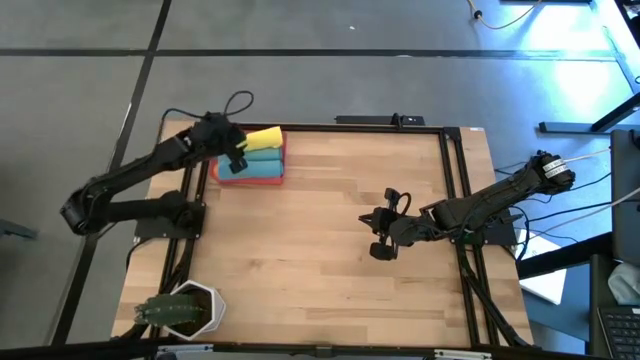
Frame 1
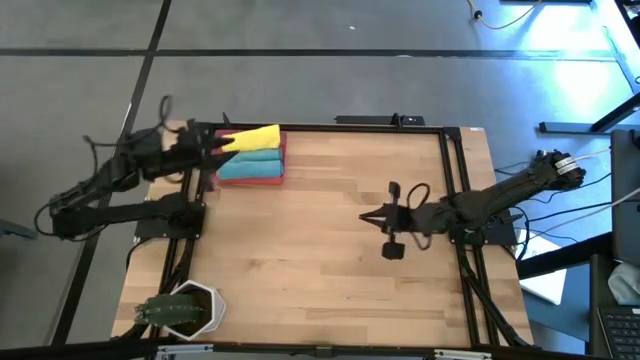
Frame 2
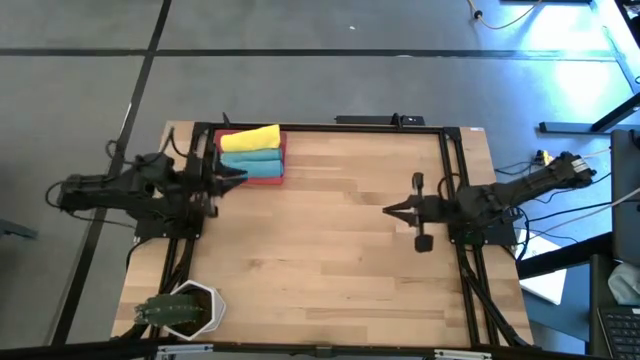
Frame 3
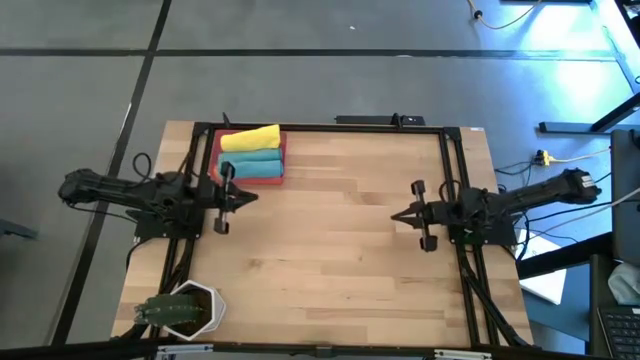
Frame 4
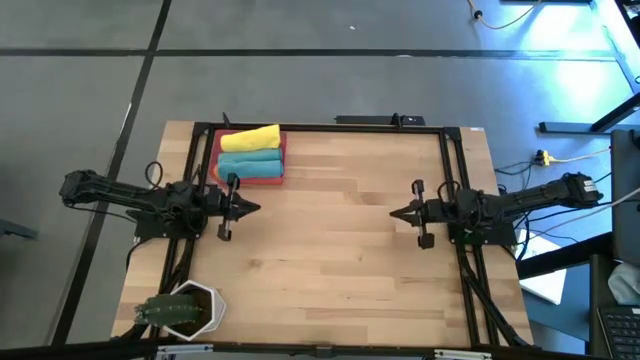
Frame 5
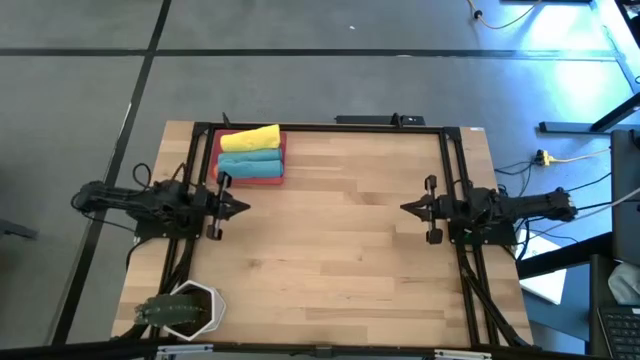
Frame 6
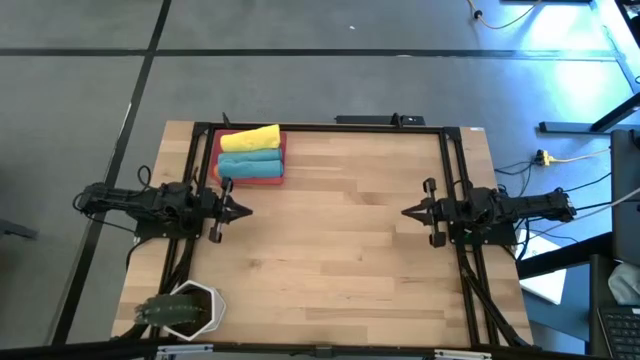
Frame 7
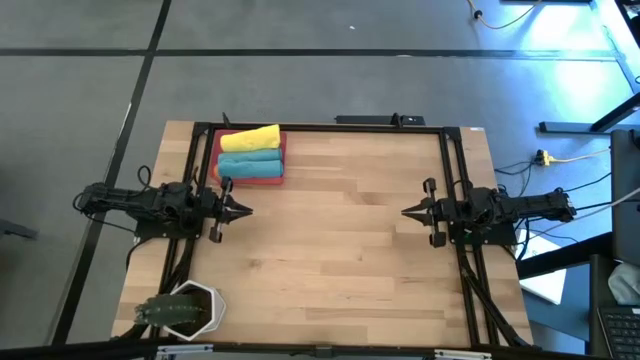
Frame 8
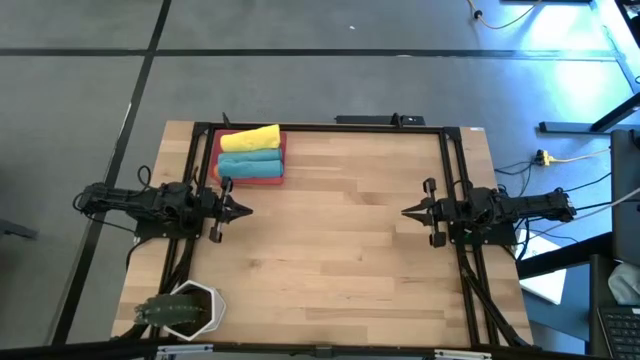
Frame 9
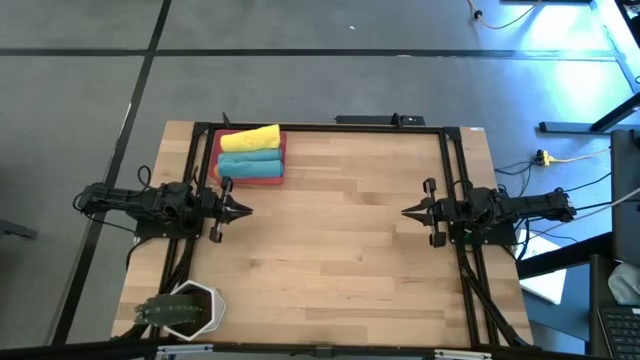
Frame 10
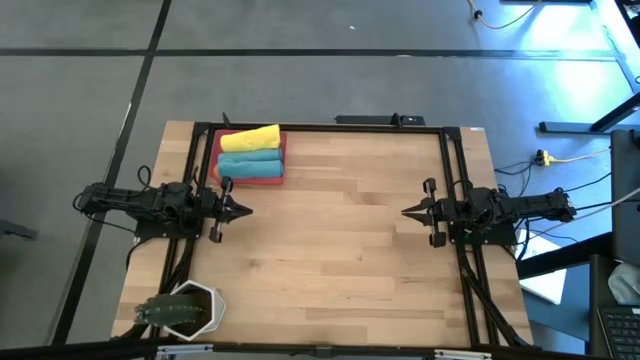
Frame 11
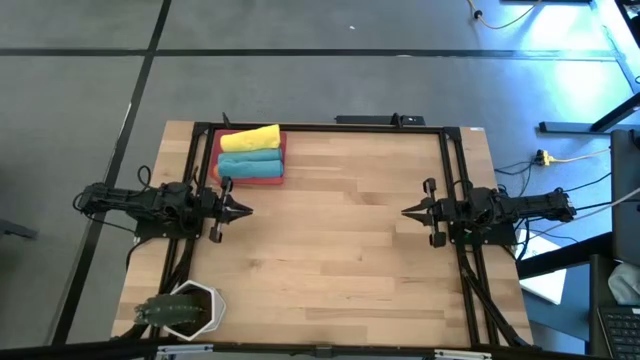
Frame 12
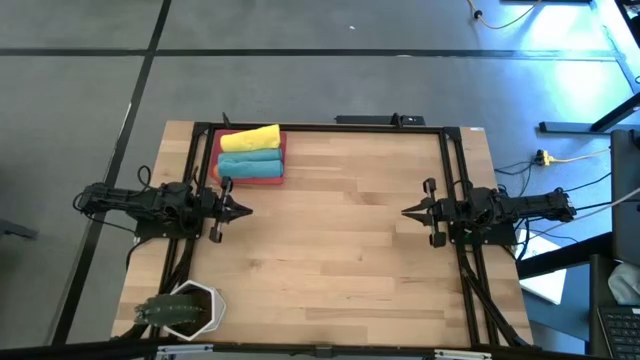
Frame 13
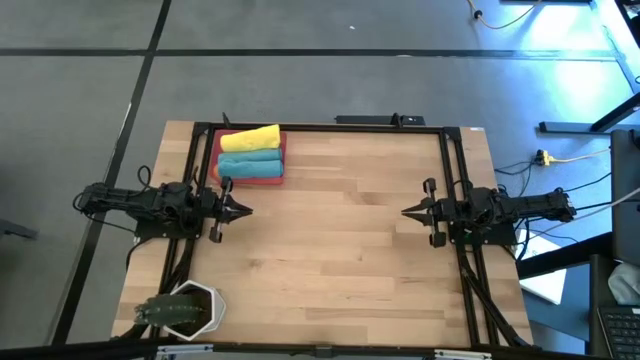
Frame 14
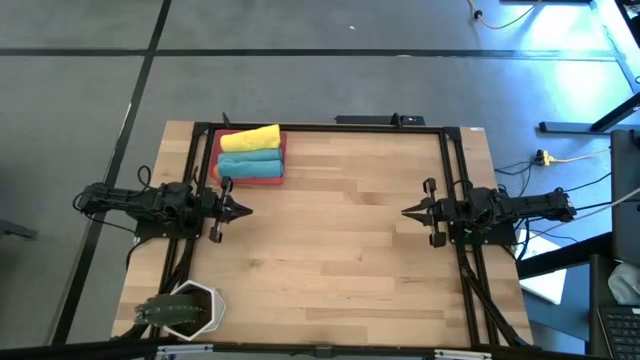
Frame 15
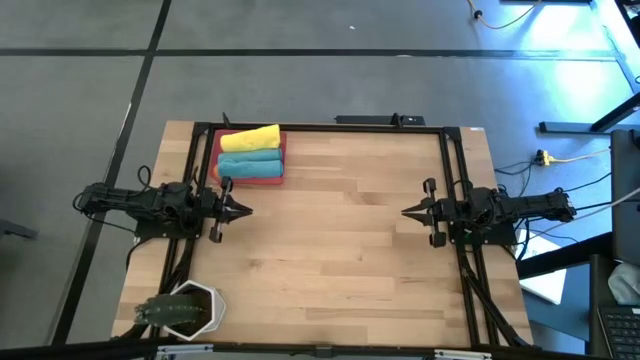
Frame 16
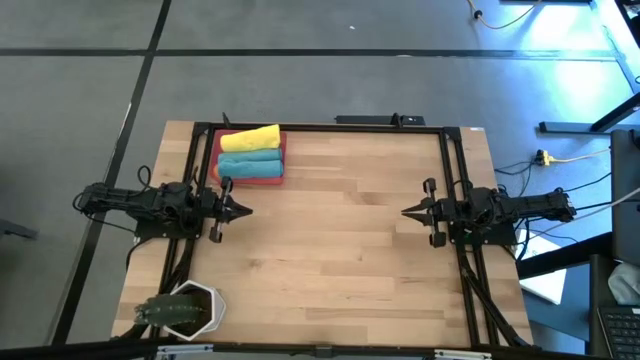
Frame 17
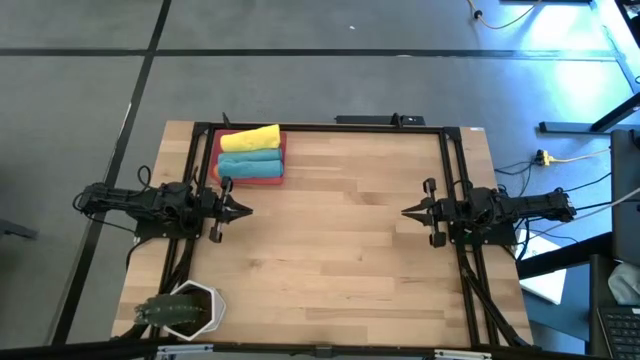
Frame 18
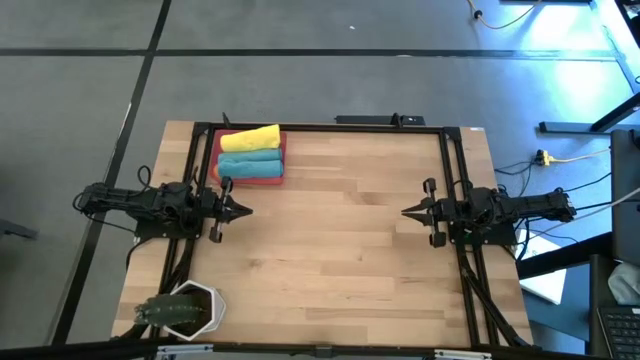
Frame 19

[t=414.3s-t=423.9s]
Task: Roll microfiber towels into tight, uniform cylinder then place into a basket
Return to Home Position

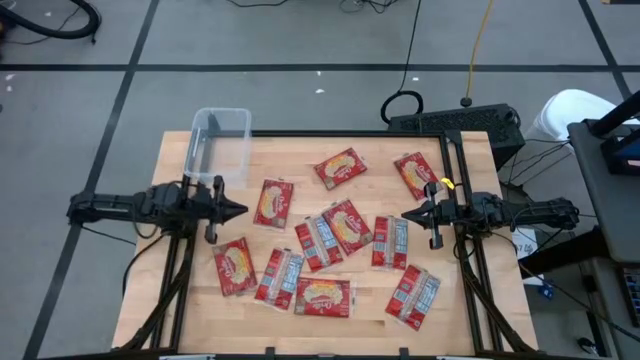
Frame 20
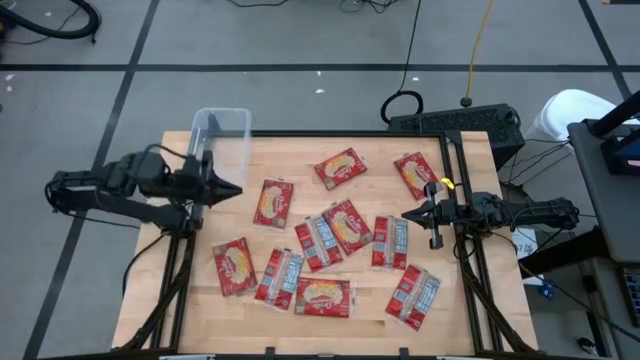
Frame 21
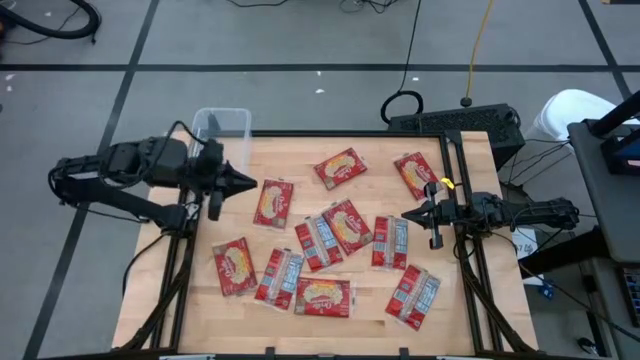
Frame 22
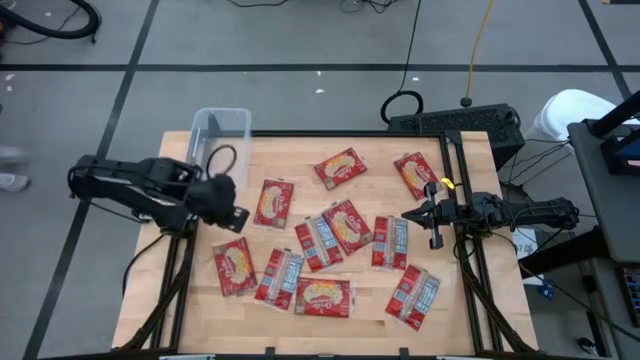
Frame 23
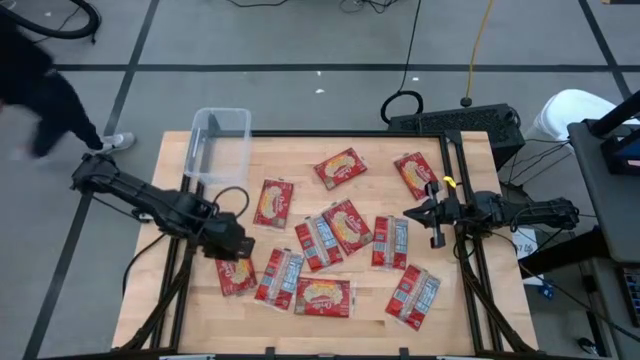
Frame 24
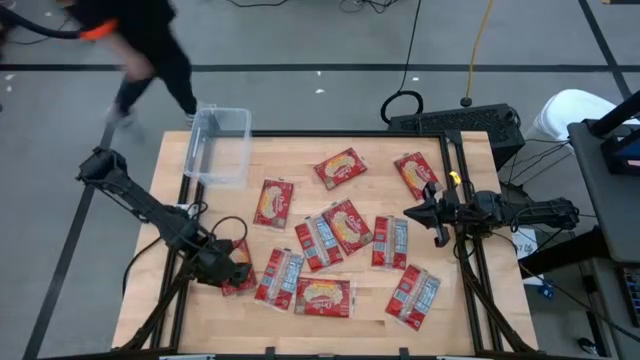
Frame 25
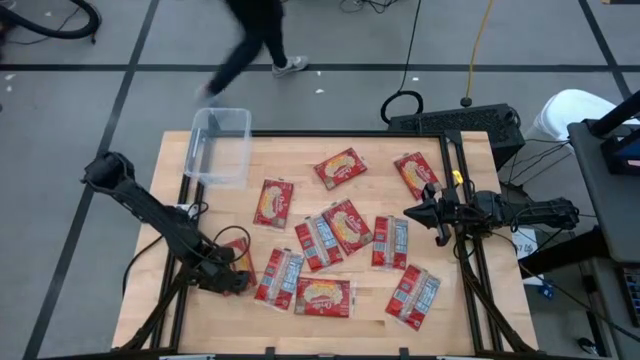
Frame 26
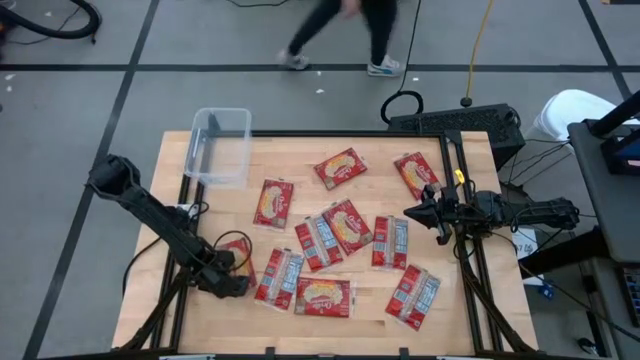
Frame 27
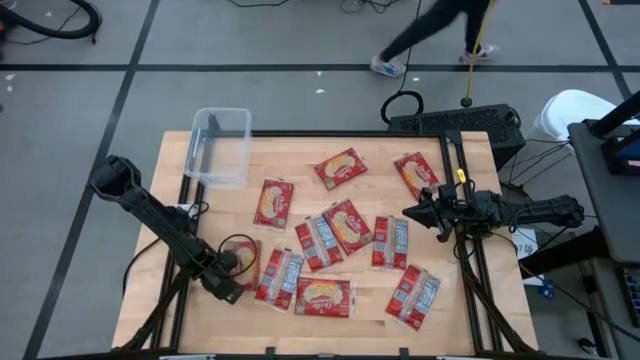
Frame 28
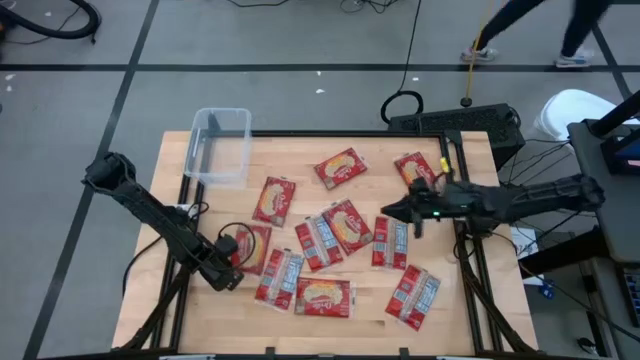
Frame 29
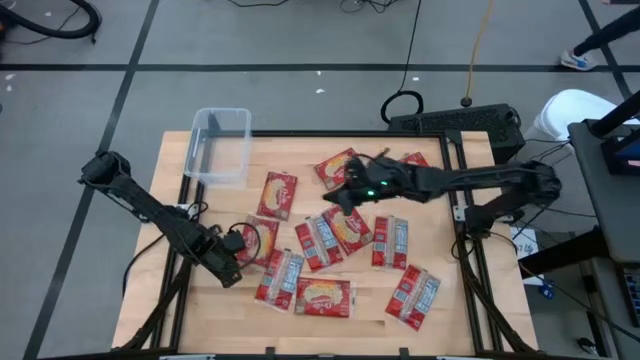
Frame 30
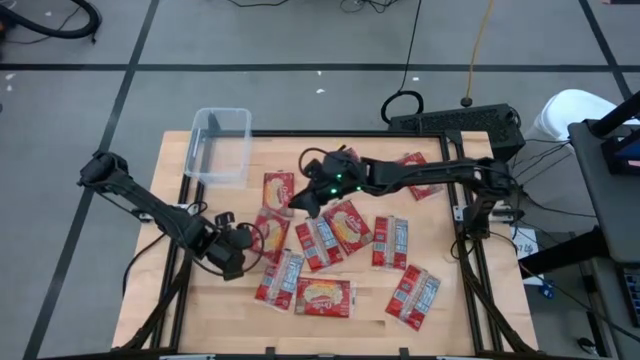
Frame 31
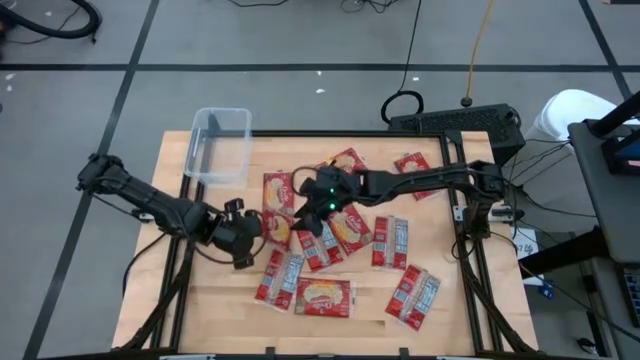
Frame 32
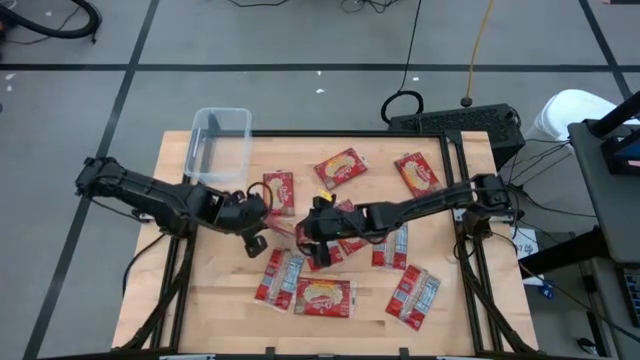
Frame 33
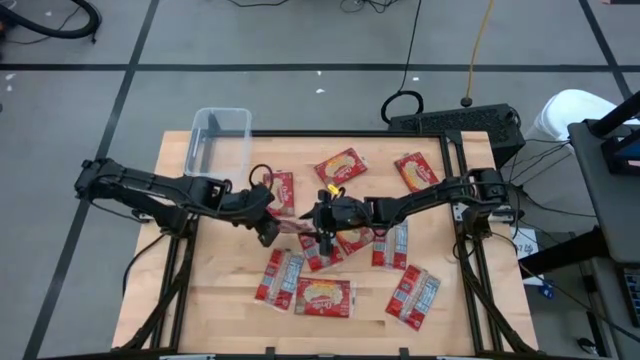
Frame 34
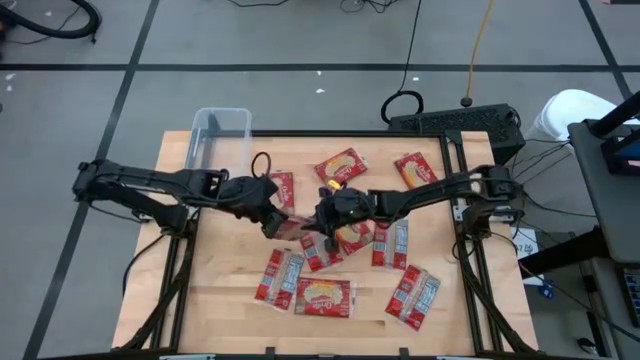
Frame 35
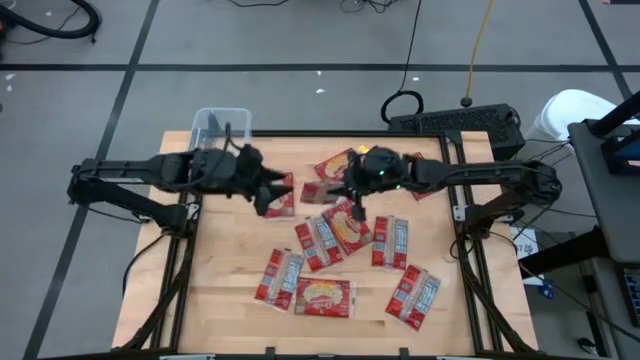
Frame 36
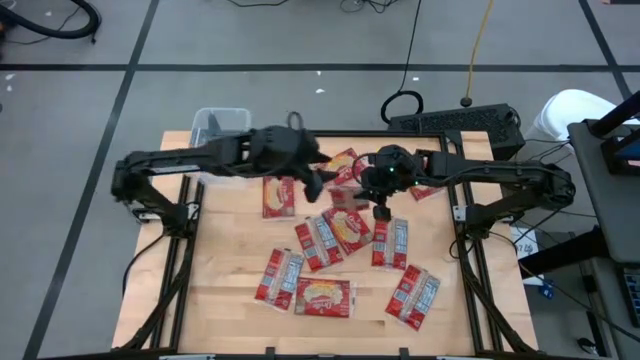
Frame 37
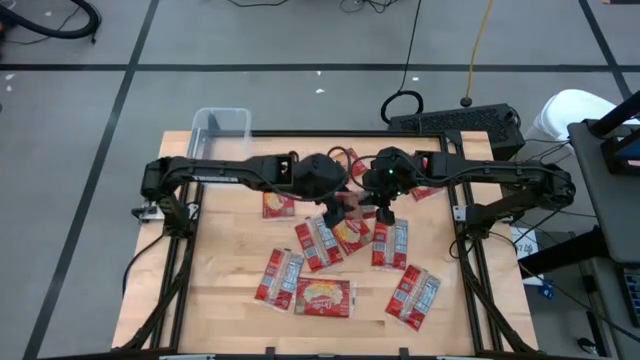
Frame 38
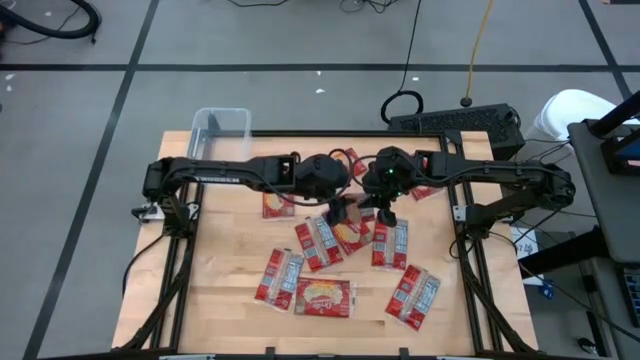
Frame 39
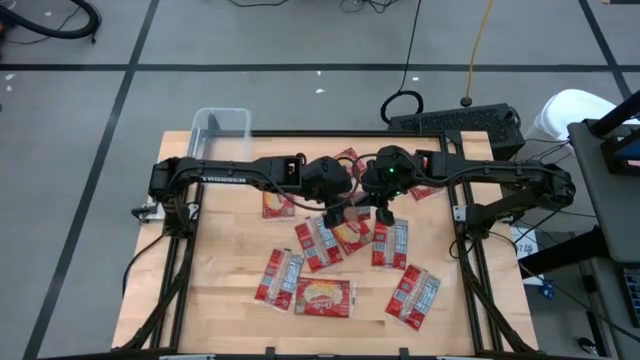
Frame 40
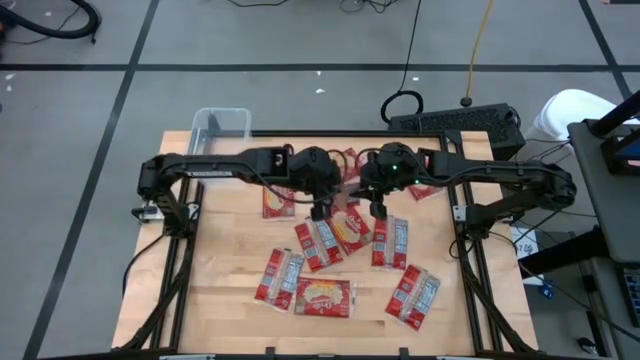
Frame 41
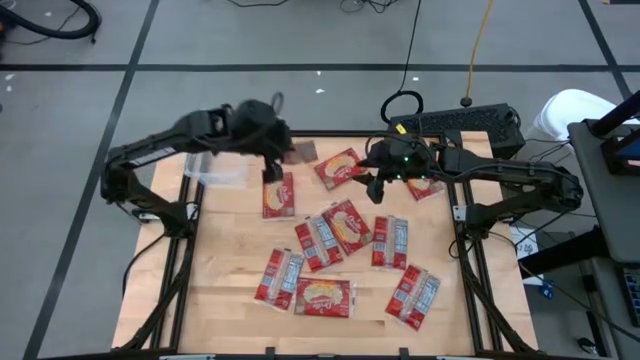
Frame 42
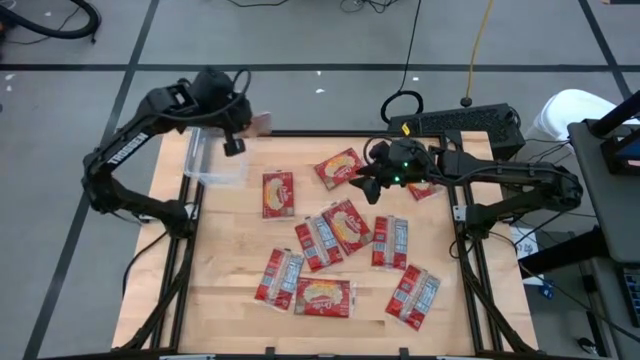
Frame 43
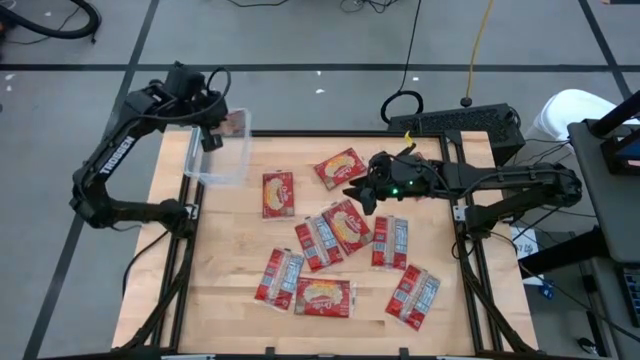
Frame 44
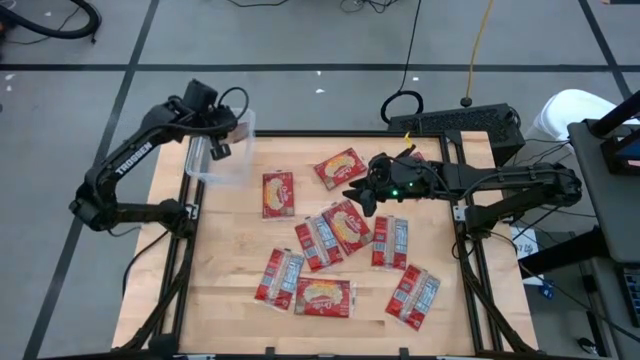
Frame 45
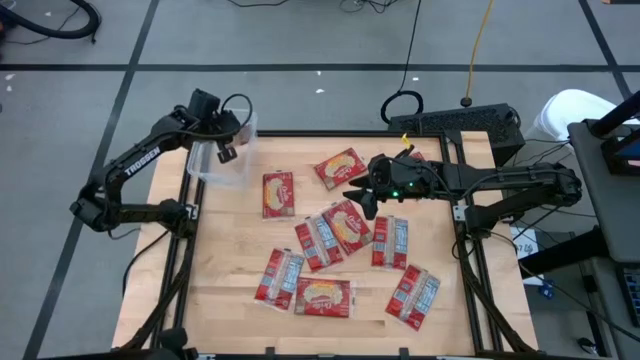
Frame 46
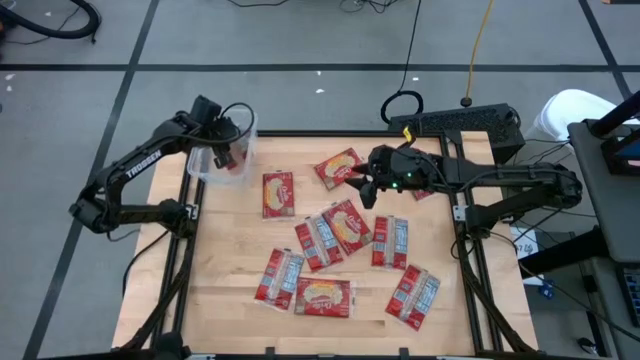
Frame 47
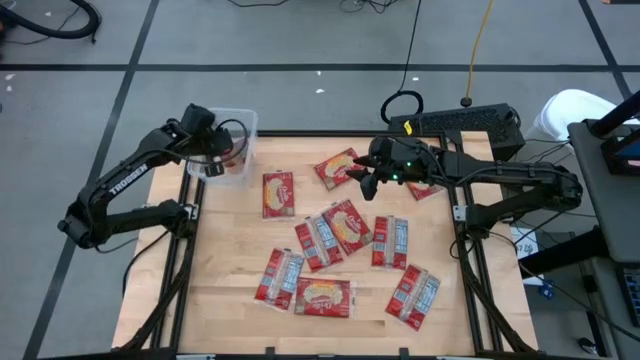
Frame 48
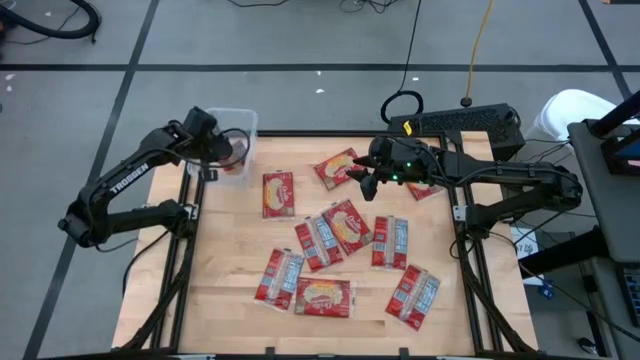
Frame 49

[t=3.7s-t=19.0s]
Task: Sort popcorn bags into baskets
Put the red popcorn bag into the transparent container
